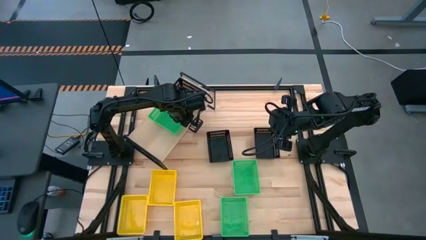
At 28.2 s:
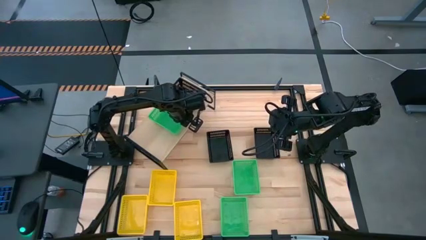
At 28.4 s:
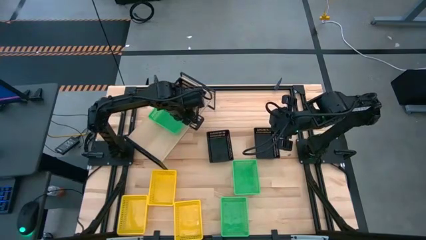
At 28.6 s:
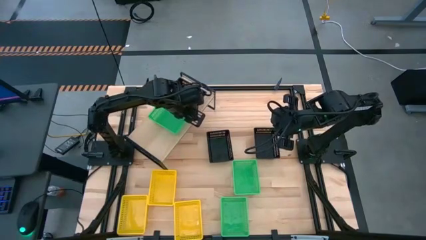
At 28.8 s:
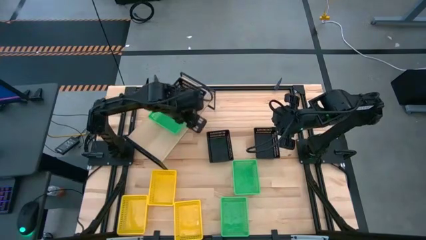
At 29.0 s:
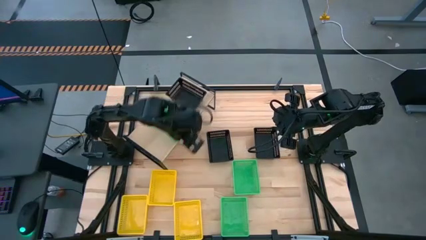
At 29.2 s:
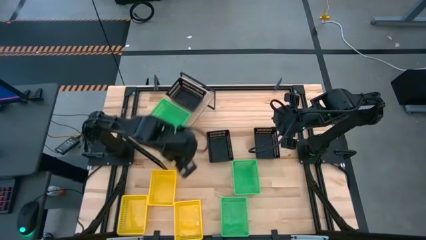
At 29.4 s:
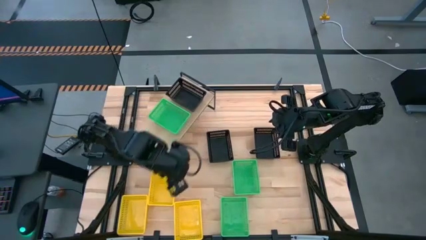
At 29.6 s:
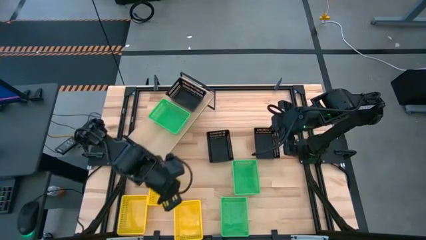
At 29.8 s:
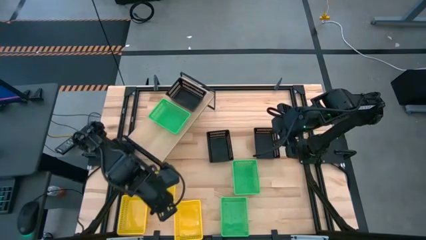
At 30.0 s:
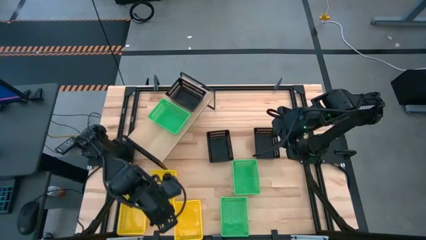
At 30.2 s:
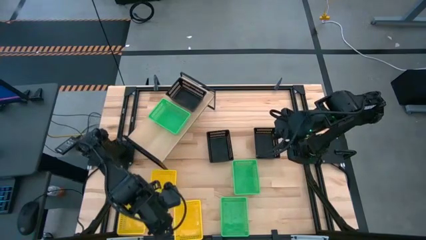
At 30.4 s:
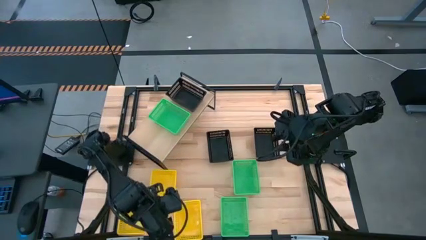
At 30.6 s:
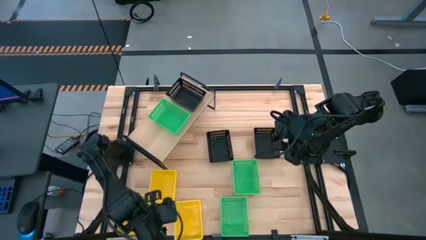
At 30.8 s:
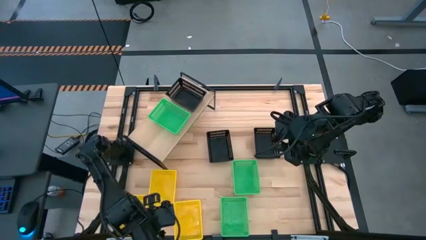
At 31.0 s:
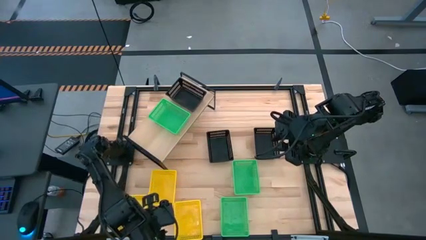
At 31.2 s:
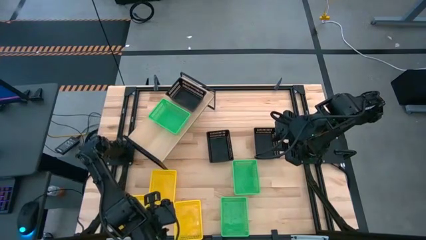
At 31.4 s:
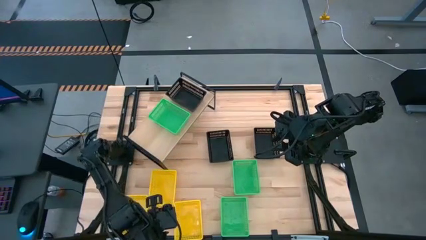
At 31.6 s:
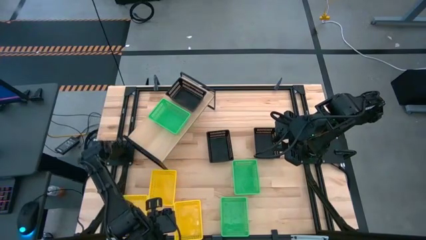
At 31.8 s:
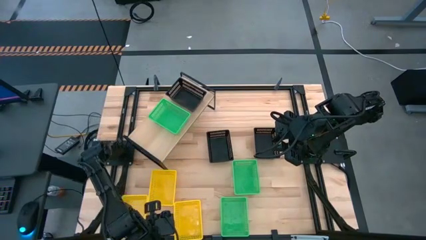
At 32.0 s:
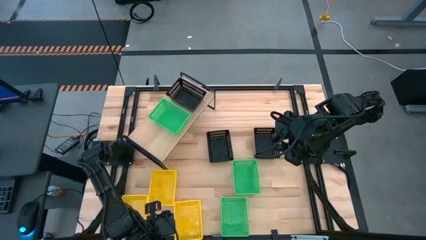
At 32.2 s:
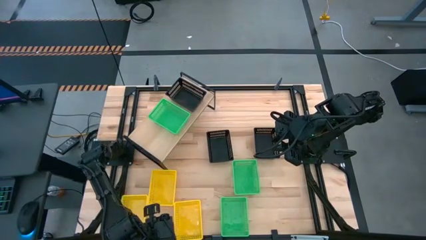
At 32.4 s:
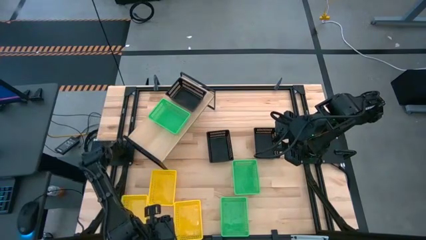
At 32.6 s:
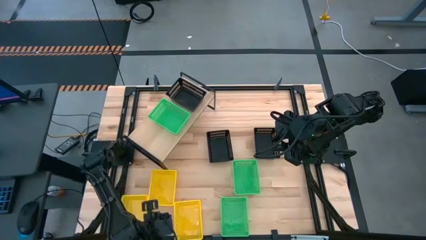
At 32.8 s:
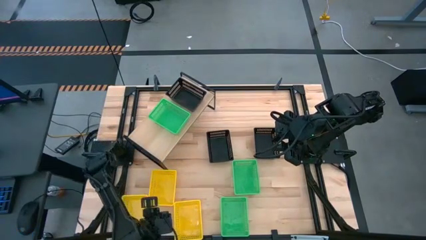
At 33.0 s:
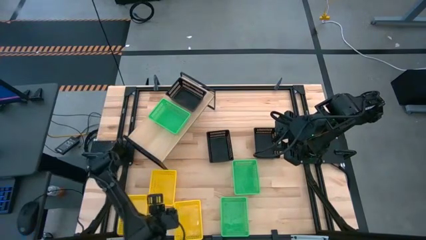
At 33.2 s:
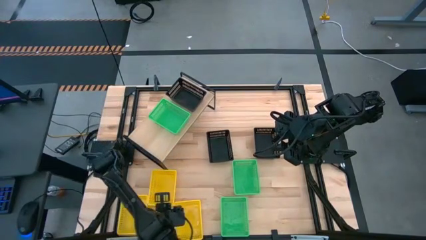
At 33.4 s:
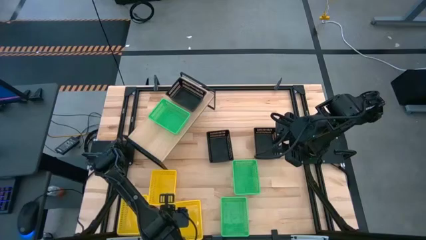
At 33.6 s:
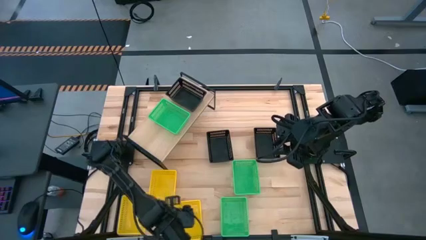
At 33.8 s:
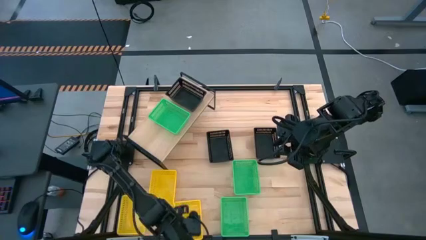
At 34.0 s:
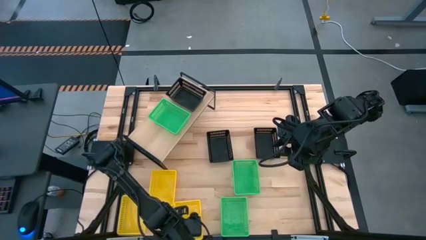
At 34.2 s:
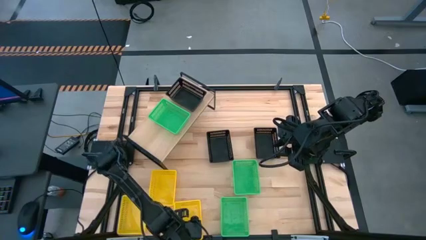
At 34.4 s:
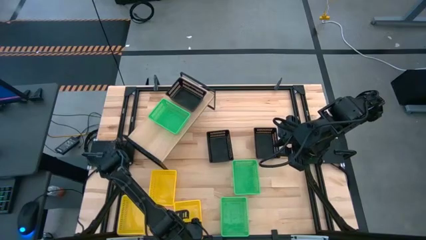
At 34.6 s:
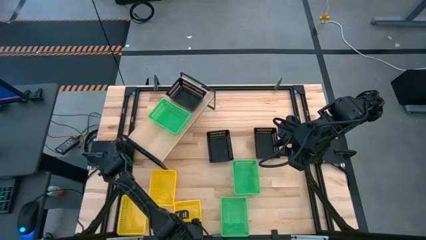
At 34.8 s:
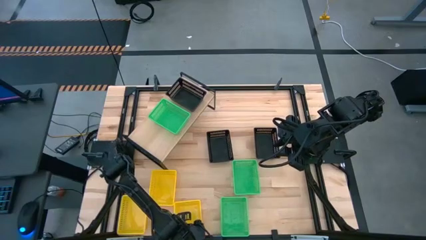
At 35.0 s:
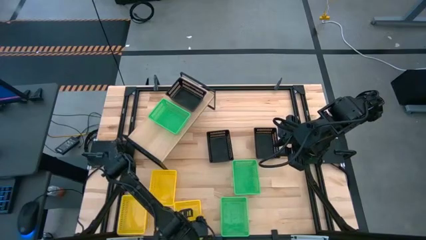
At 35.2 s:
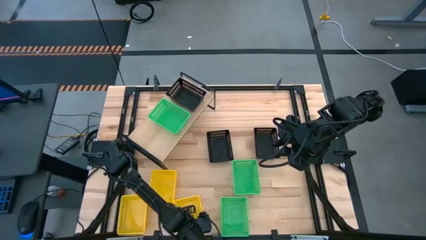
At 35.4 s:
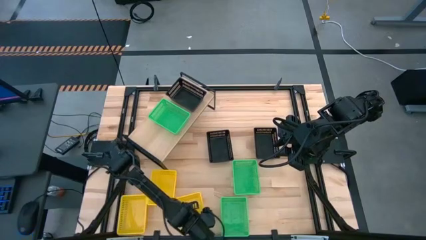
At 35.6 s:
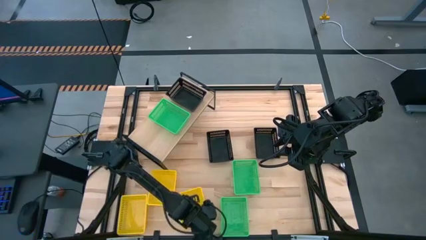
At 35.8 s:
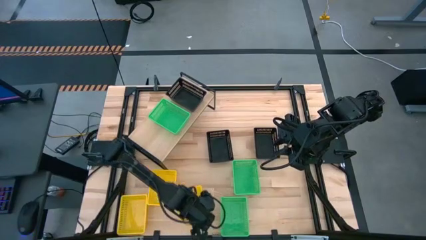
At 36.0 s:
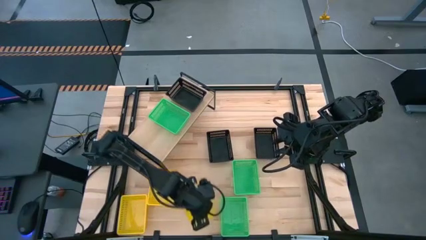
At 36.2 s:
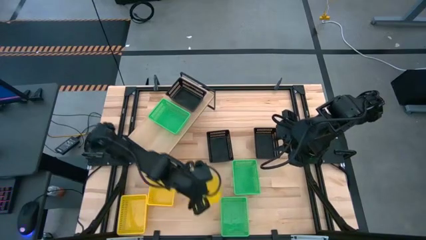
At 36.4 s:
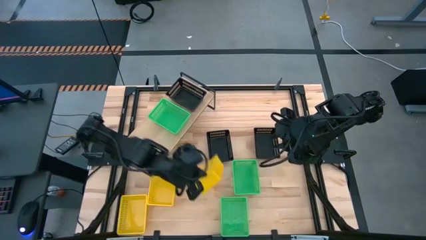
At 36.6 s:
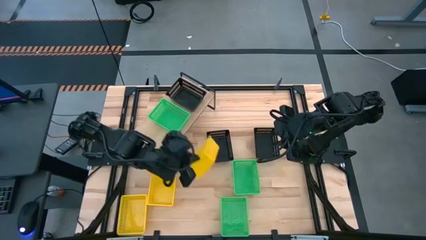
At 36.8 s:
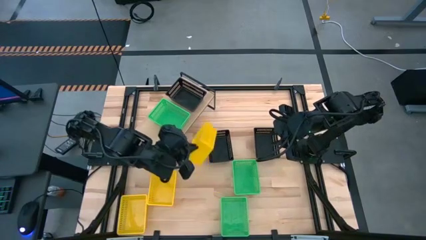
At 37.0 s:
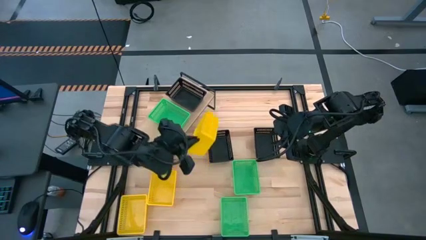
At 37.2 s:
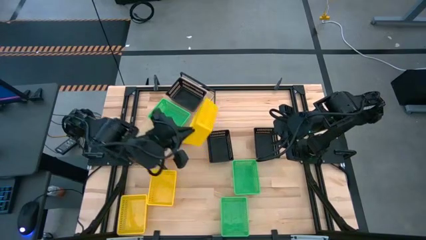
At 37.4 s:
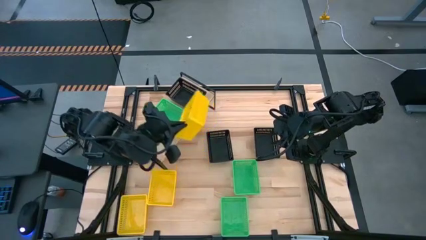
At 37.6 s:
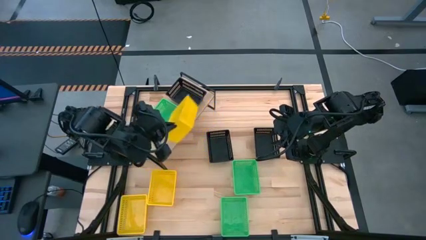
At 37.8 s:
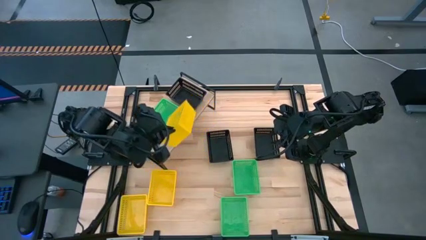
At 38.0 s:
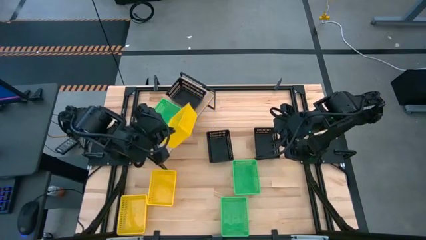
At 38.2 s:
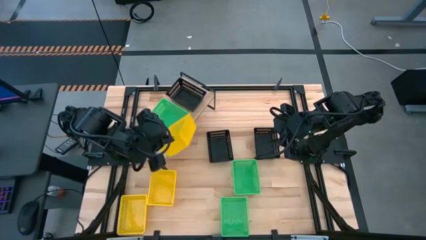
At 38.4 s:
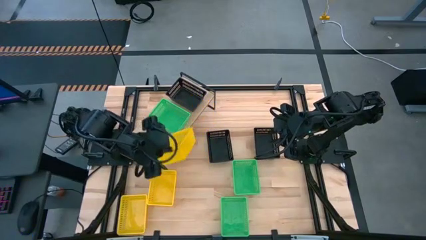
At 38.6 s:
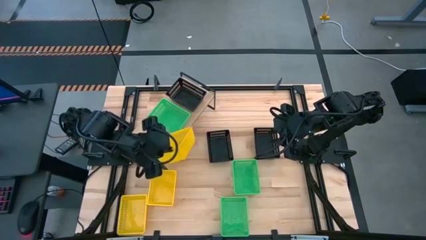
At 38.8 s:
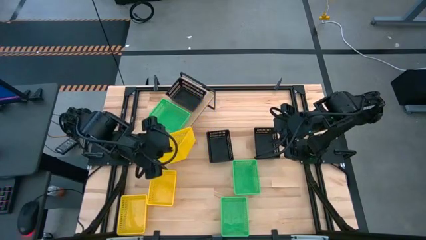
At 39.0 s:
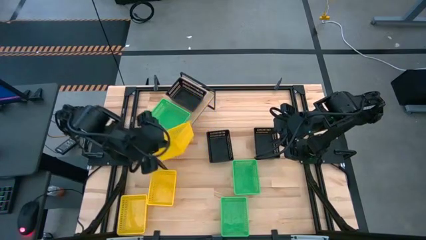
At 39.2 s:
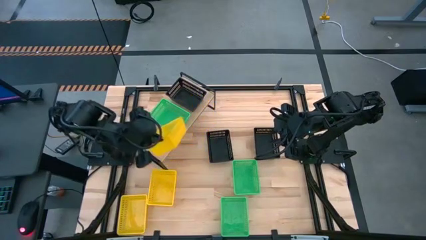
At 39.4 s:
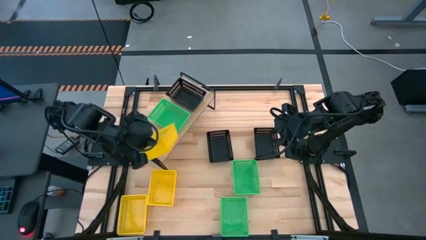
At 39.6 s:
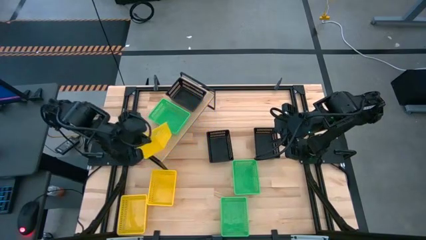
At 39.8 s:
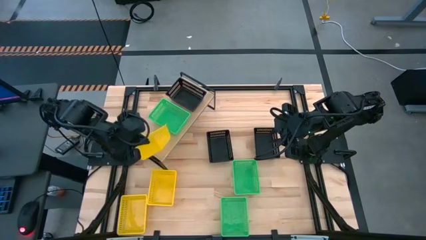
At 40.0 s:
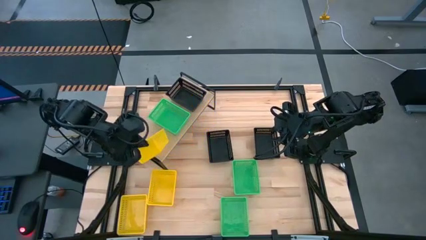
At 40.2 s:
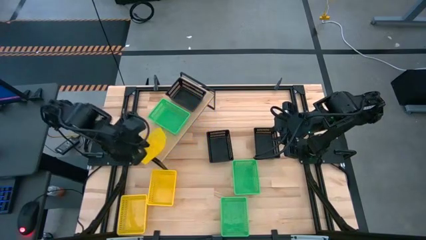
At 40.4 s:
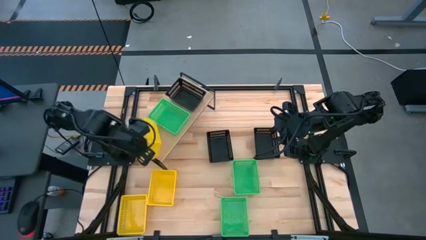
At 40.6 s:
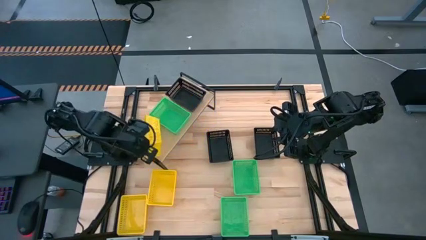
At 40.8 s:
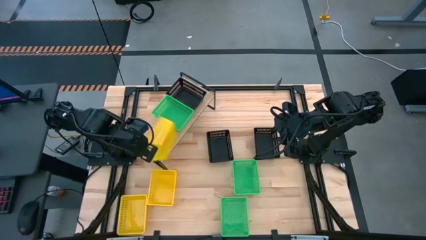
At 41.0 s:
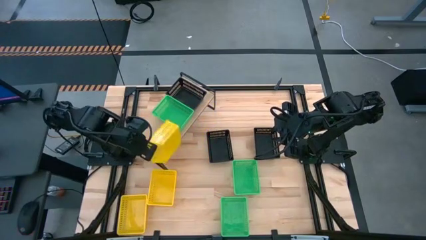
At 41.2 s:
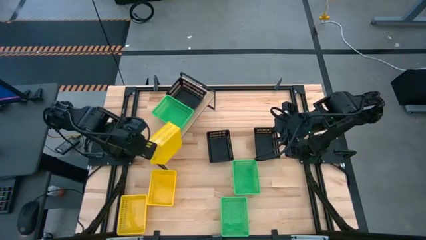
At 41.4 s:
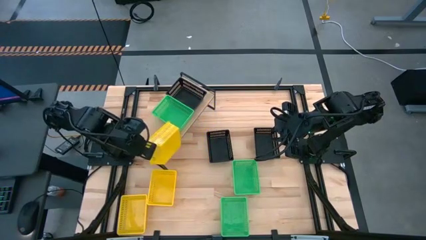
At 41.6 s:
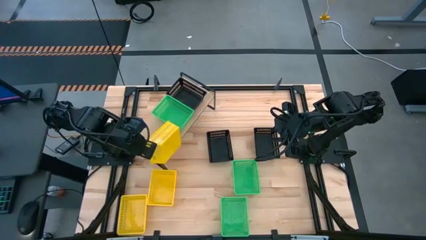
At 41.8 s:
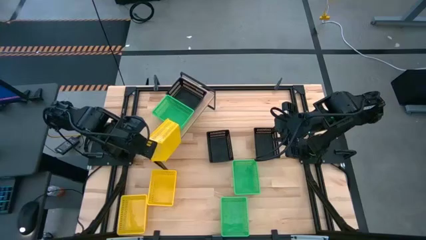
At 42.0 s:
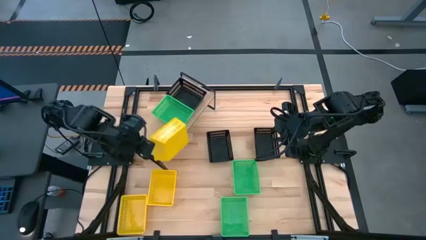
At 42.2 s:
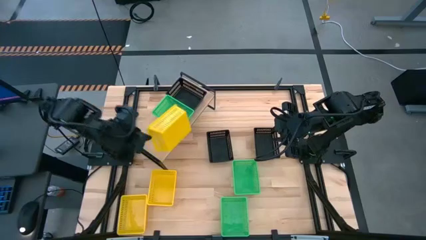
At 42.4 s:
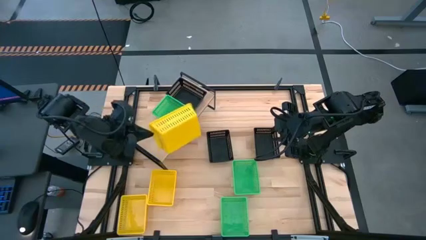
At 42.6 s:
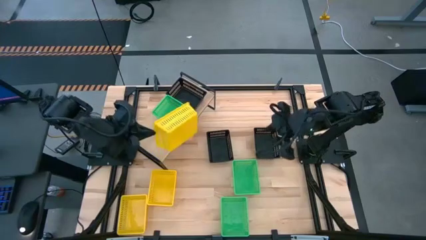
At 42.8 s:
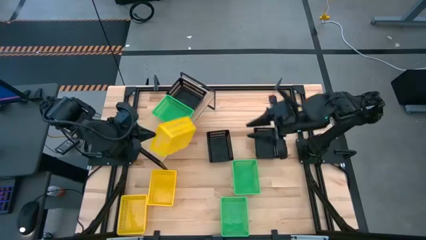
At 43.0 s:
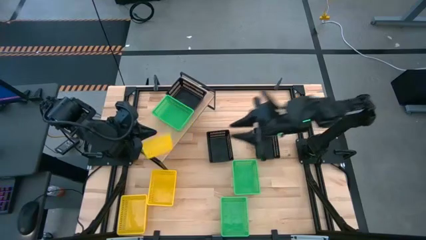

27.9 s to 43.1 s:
Task: Stack baskets on shelf by color
Put the bottom right yellow bin on the shelf
